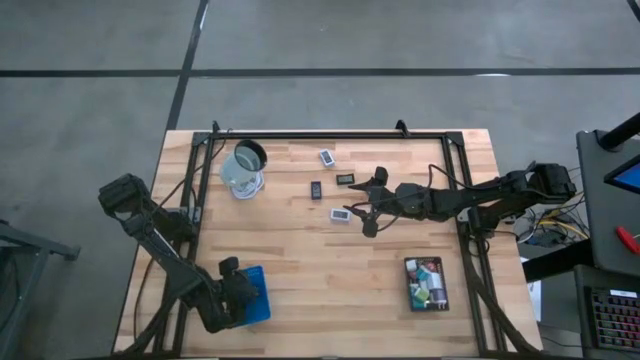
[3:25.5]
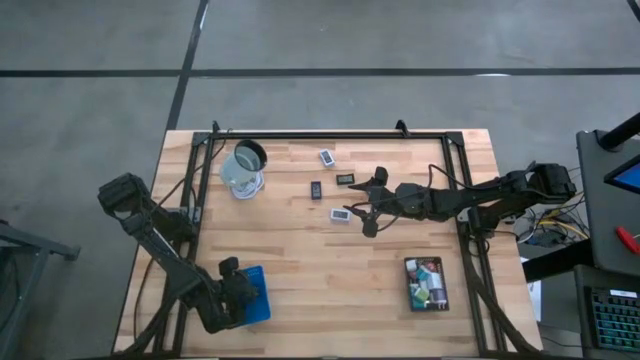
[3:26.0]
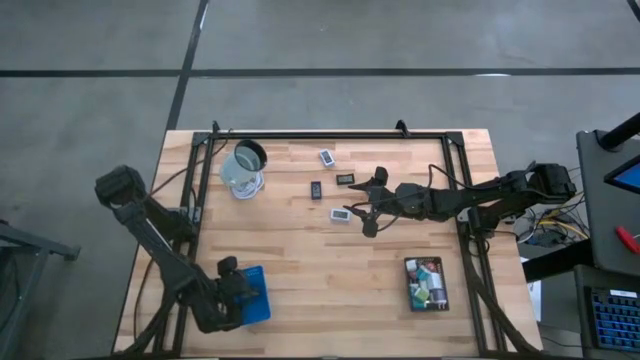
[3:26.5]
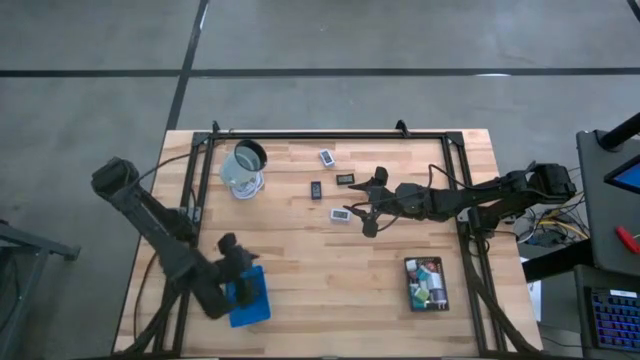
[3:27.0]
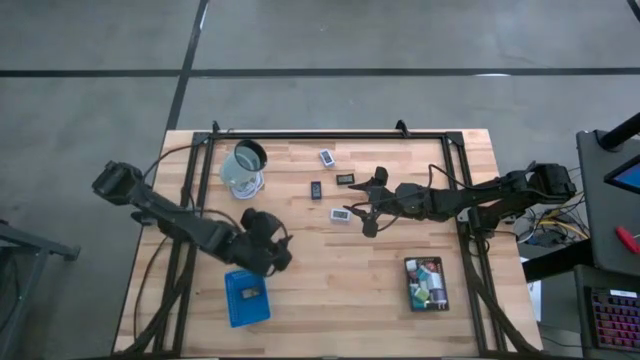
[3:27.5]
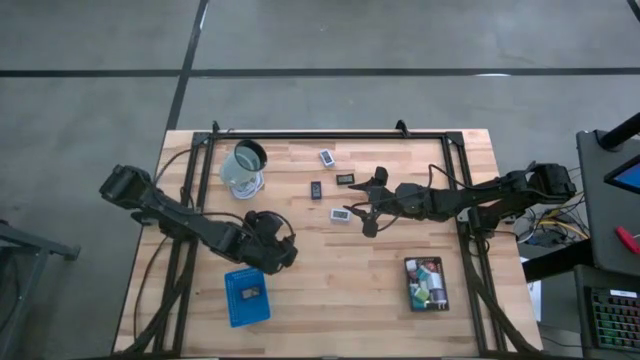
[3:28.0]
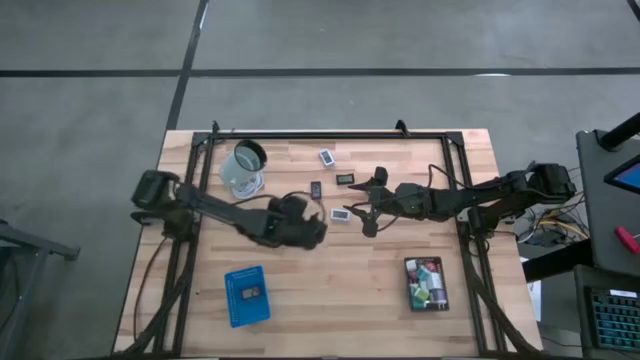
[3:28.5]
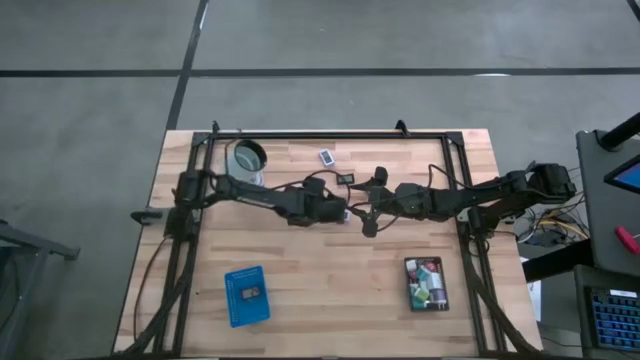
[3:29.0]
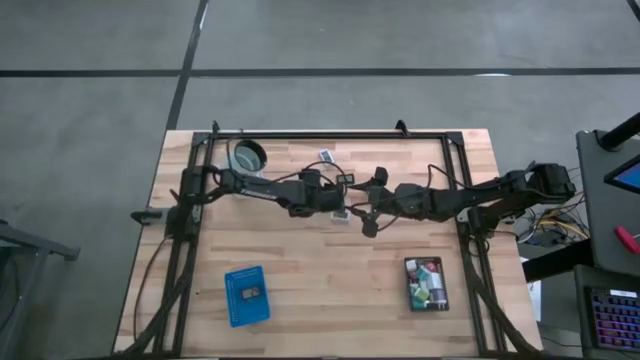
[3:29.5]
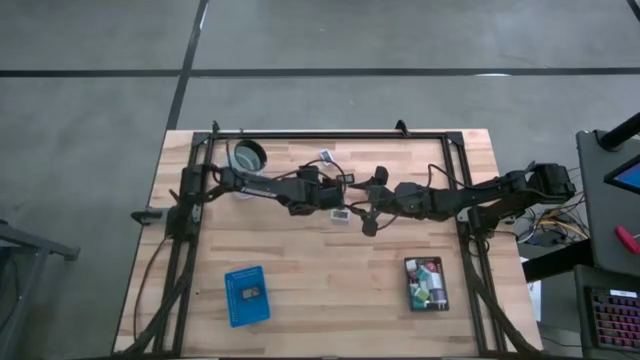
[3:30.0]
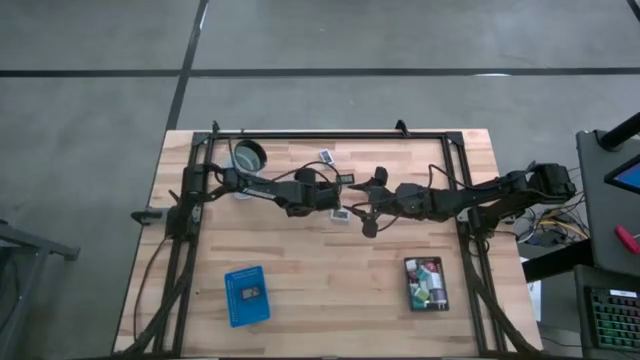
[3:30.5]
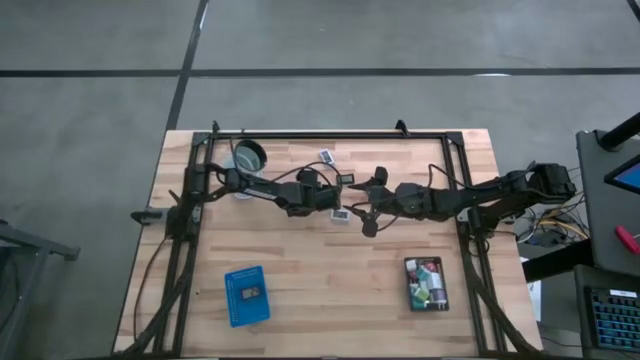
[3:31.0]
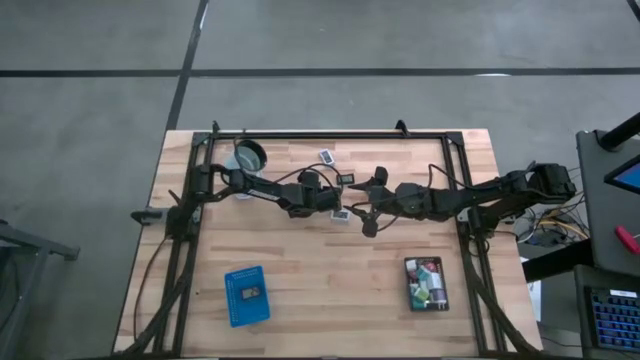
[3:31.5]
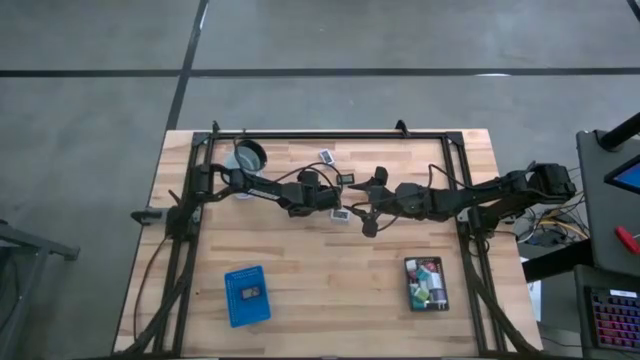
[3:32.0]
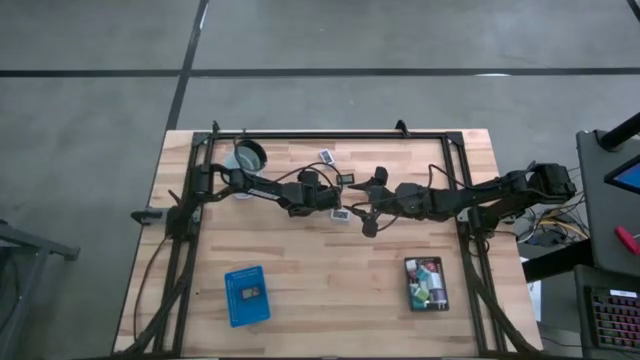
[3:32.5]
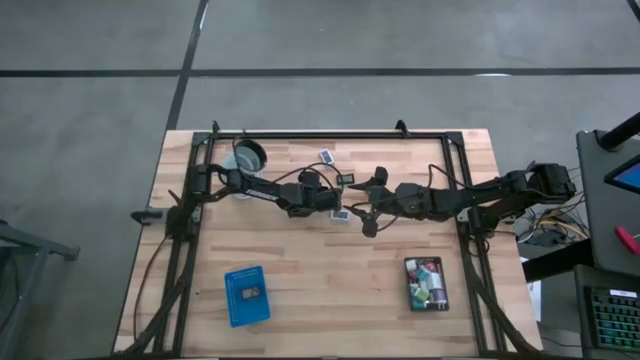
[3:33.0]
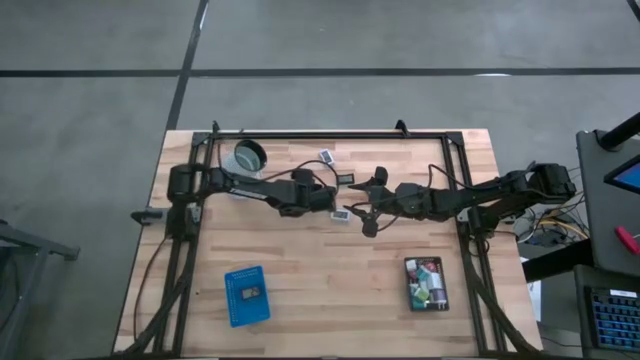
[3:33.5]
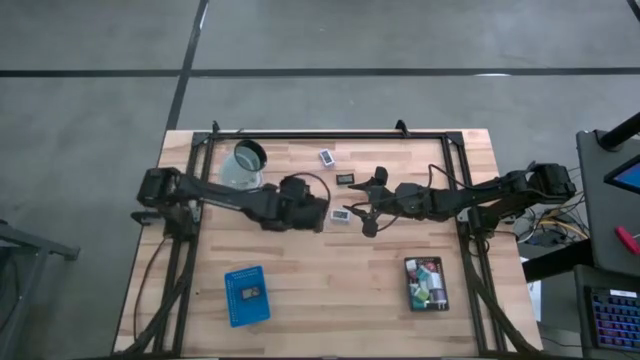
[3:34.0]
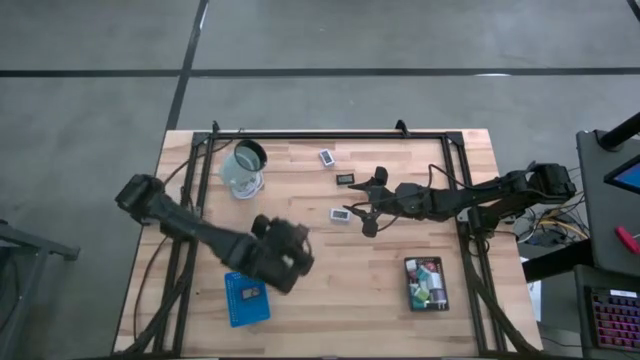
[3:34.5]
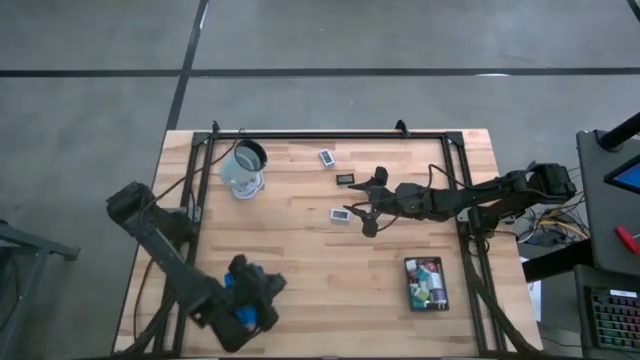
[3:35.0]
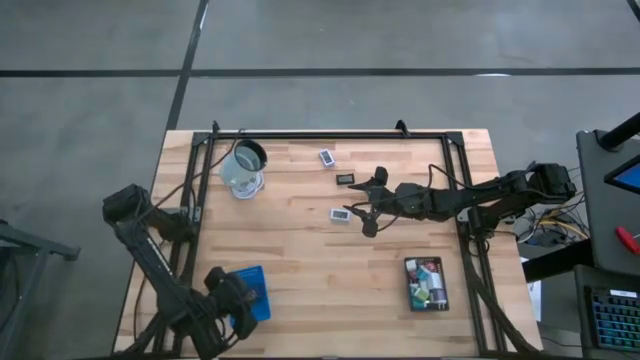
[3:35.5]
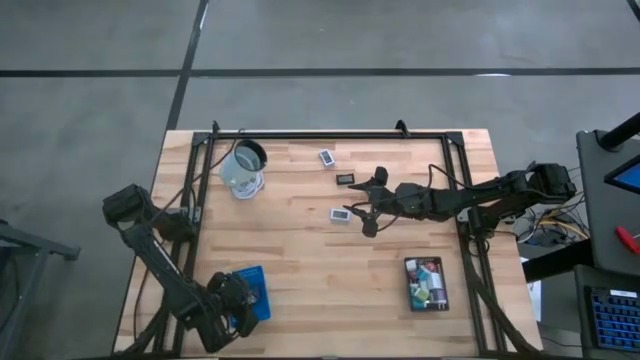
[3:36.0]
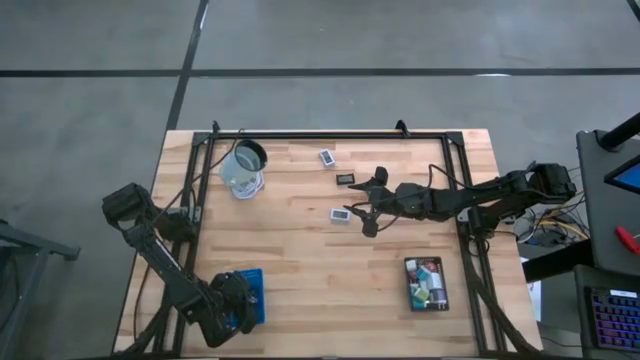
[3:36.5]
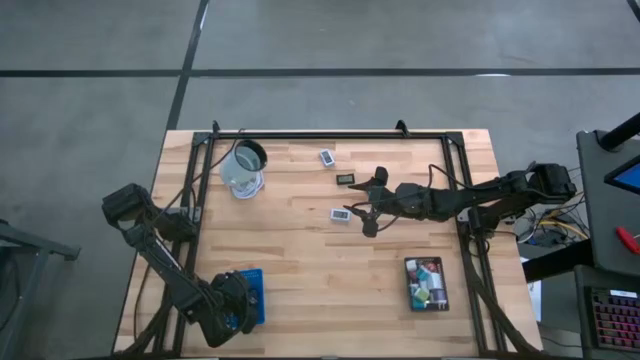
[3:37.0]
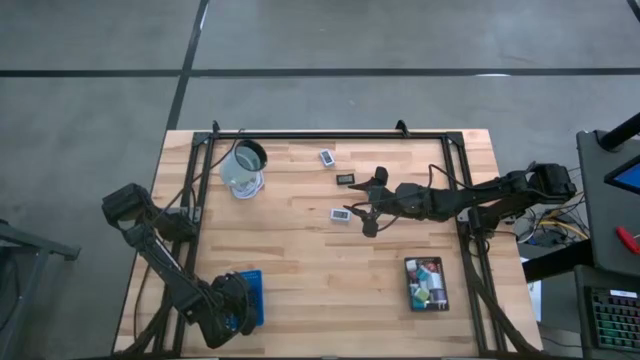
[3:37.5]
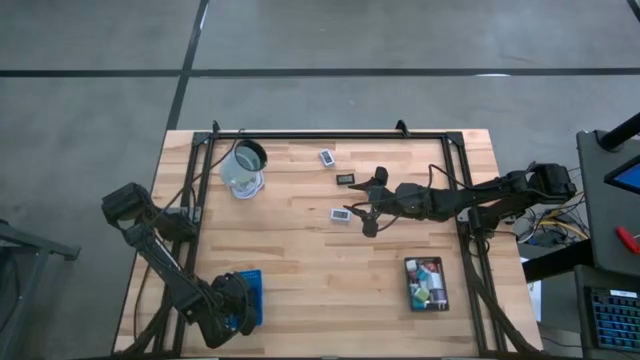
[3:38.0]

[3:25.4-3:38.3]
Task: Pick & Place Office items
Put the blue digital clock into the blue bin

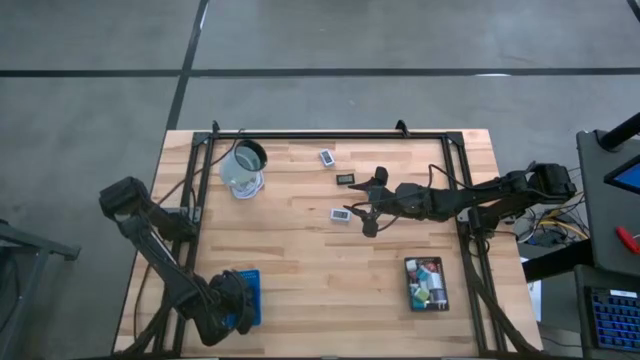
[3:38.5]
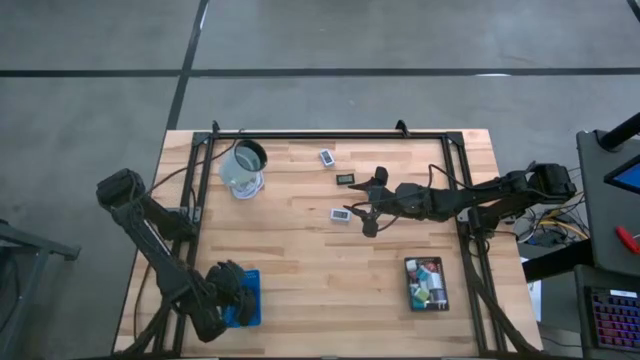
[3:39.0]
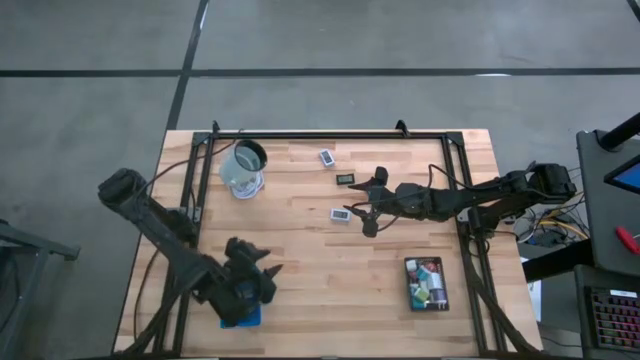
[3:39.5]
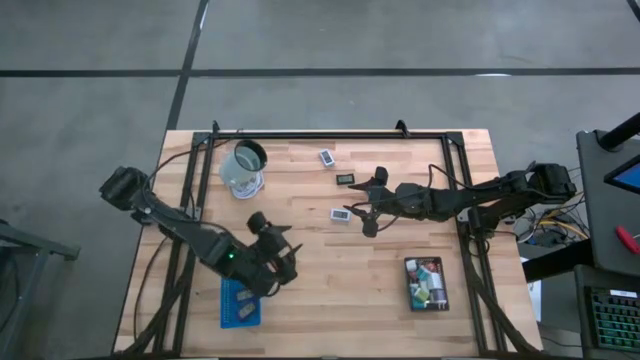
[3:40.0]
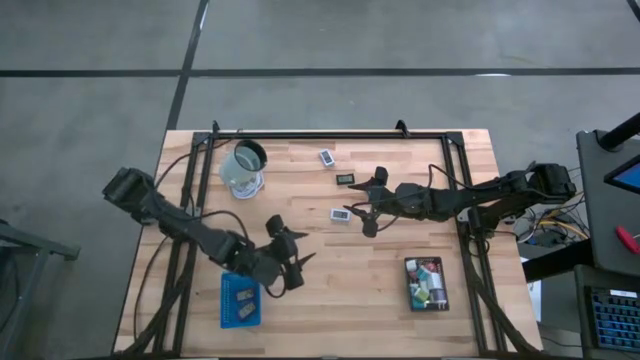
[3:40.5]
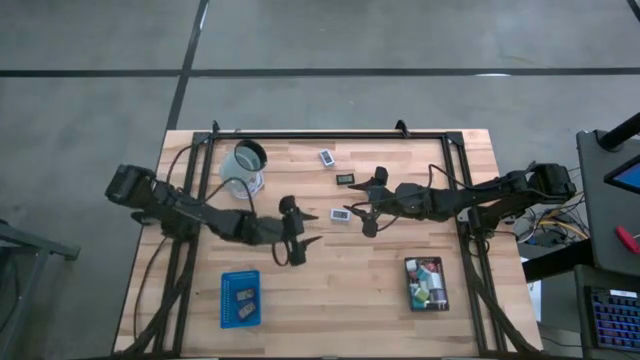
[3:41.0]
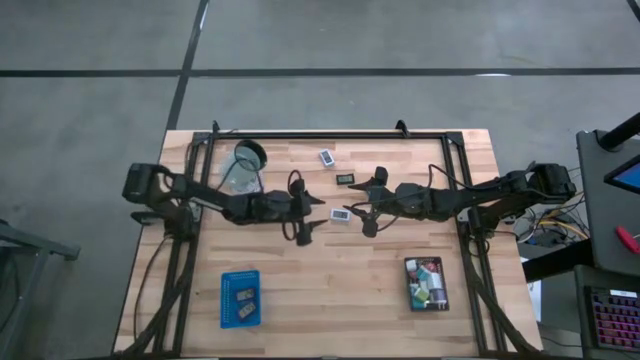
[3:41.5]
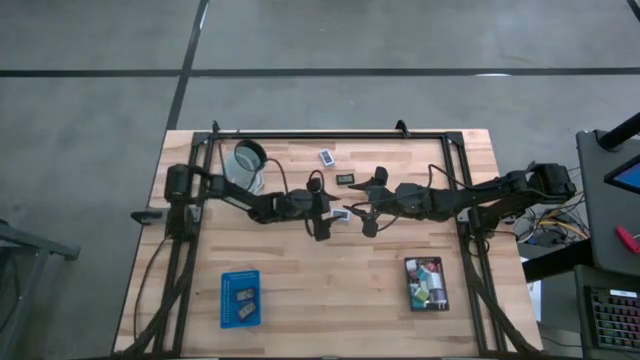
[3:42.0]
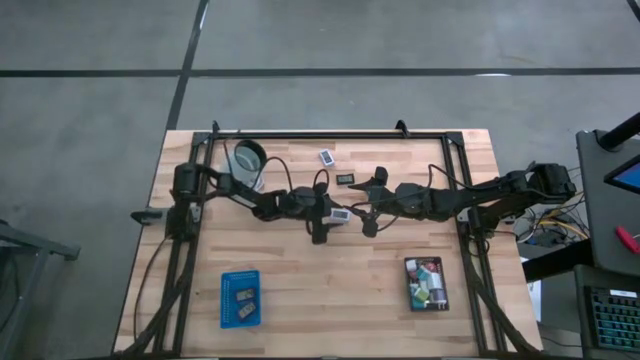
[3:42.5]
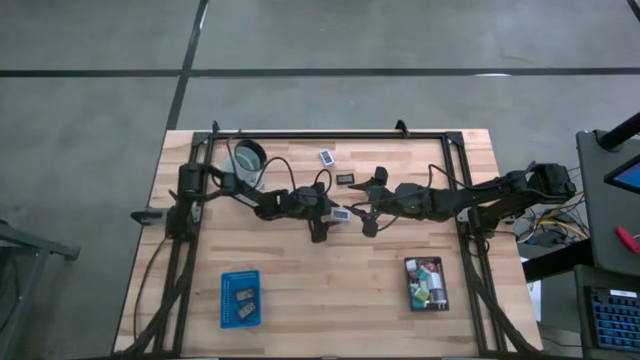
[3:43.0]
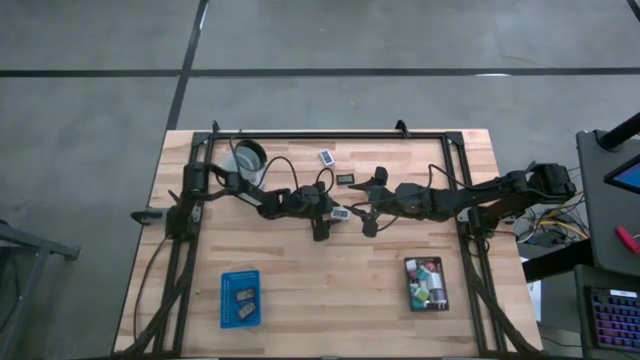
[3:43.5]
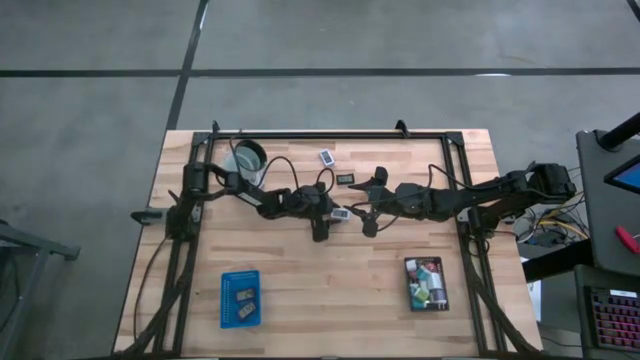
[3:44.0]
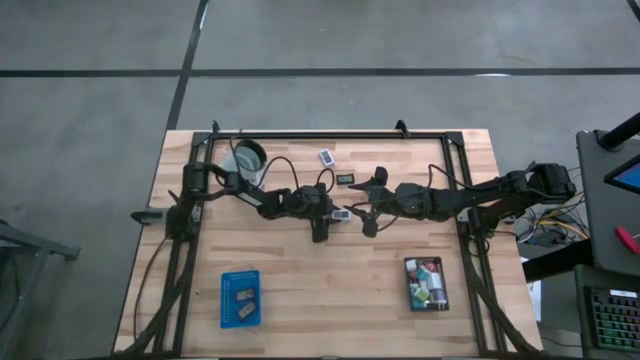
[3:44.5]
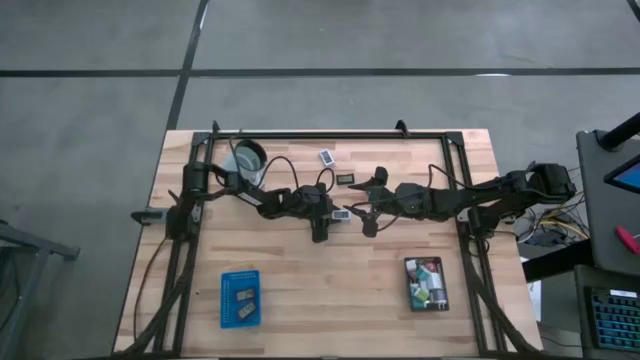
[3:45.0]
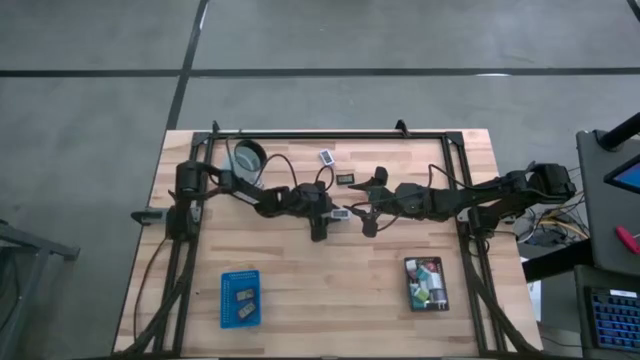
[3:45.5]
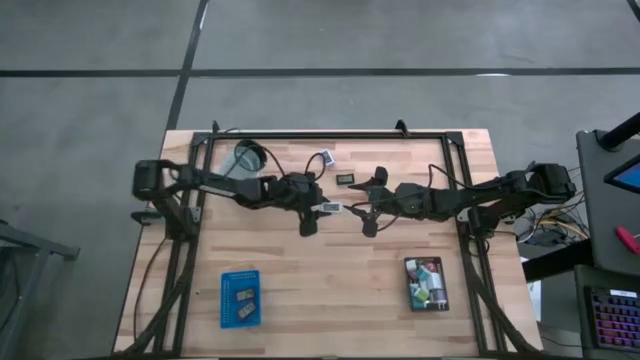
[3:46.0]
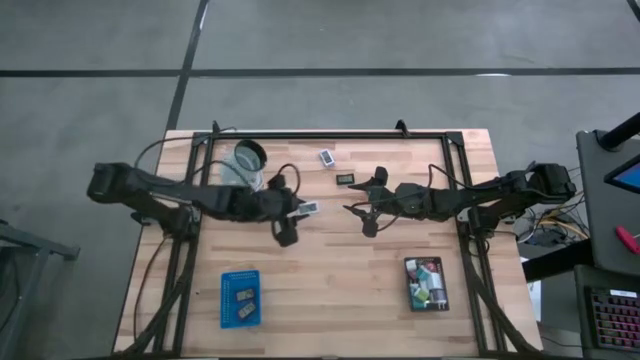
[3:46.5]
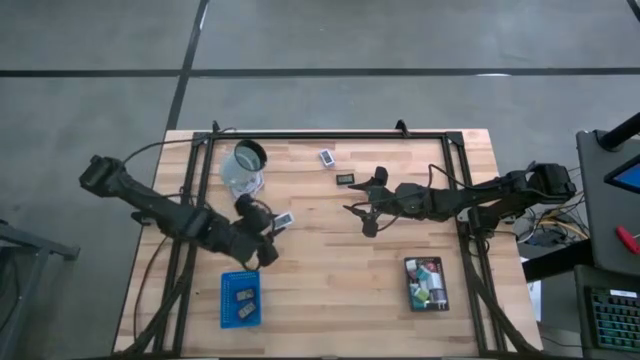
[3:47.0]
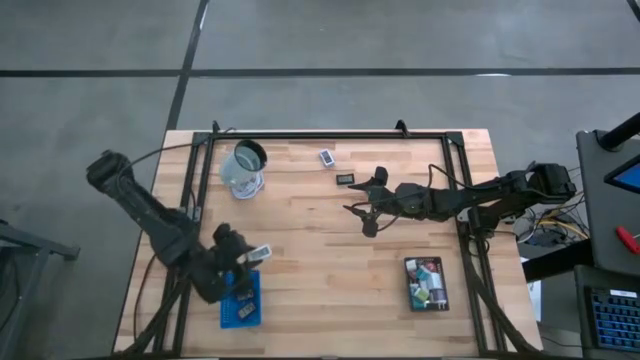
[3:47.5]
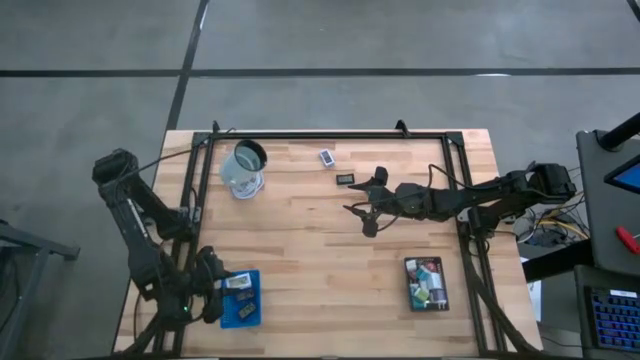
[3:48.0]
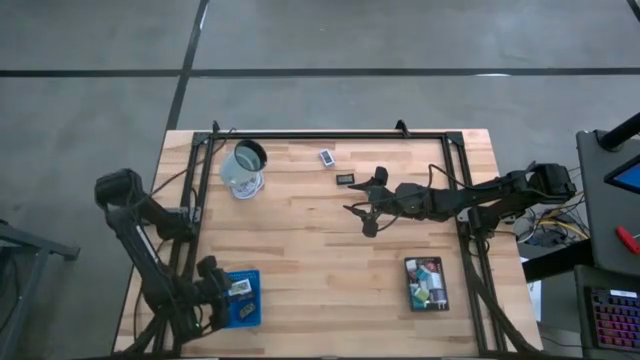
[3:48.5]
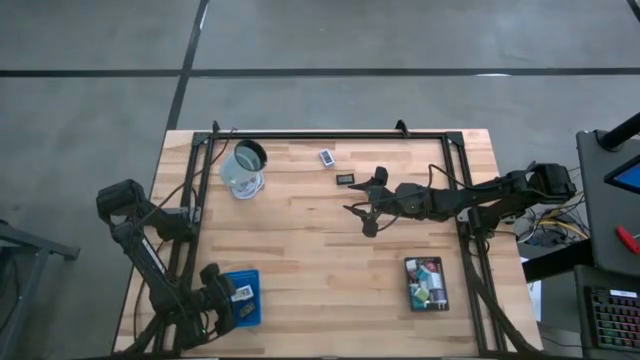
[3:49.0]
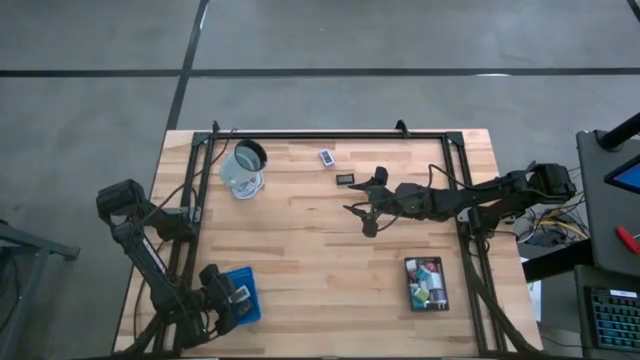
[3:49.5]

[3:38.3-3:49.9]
Put the bottom white digital clock into the blue bin
